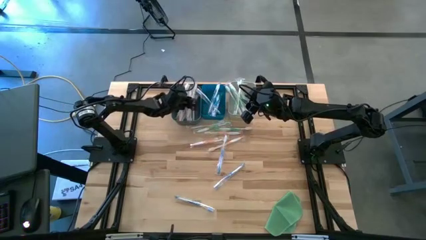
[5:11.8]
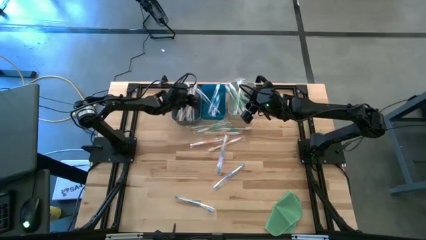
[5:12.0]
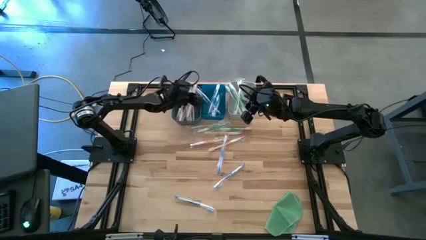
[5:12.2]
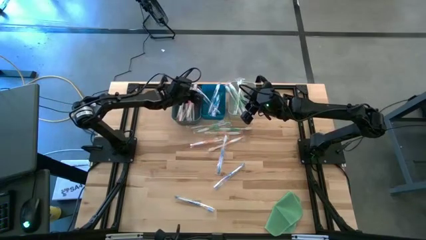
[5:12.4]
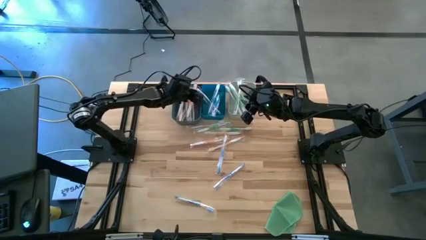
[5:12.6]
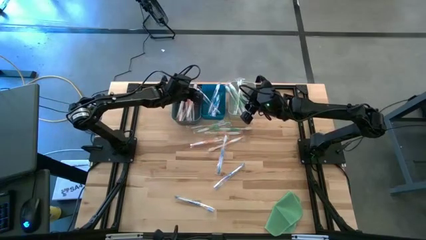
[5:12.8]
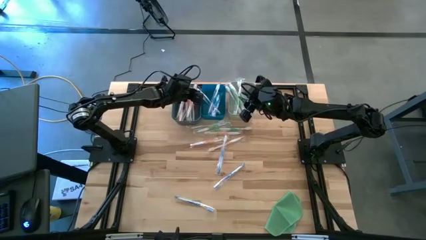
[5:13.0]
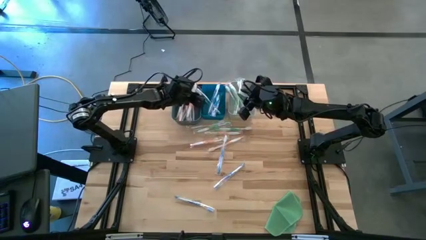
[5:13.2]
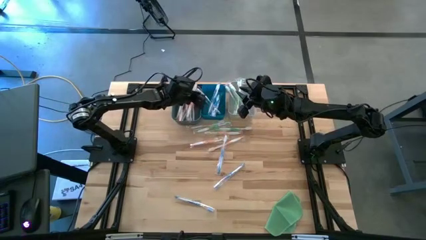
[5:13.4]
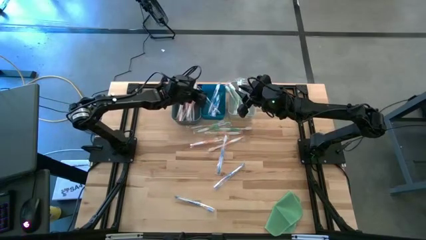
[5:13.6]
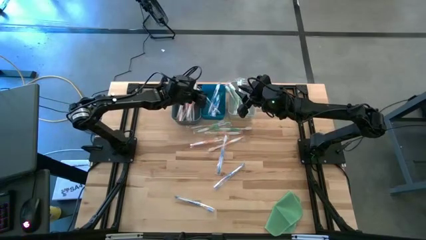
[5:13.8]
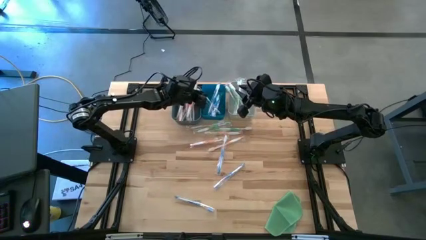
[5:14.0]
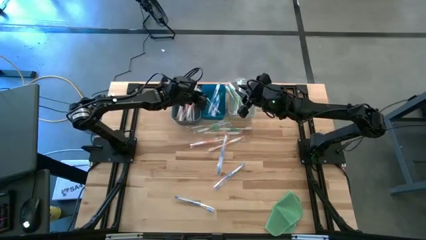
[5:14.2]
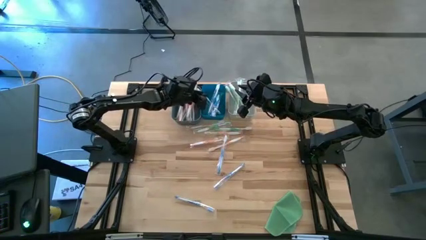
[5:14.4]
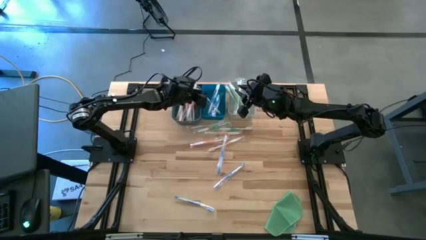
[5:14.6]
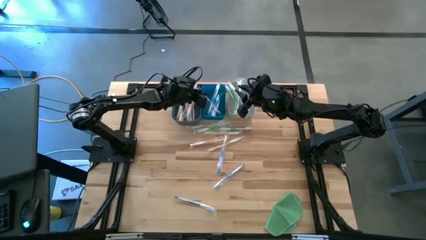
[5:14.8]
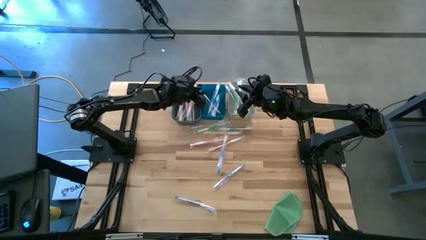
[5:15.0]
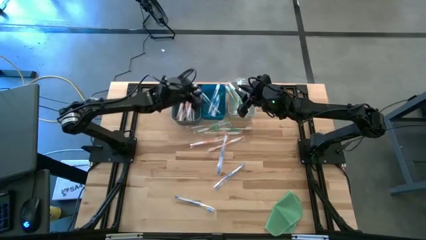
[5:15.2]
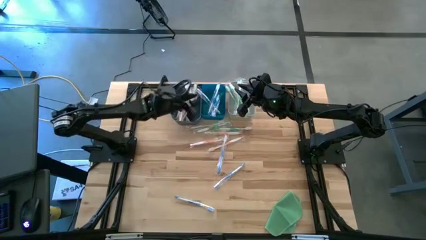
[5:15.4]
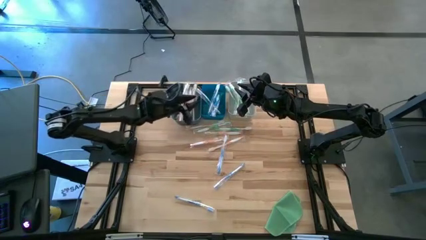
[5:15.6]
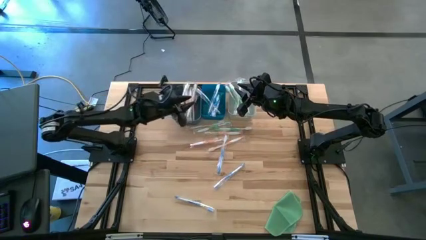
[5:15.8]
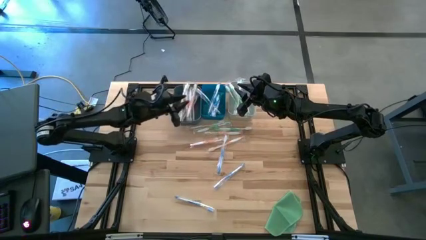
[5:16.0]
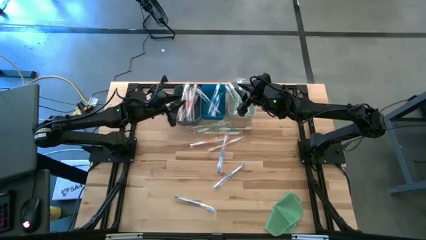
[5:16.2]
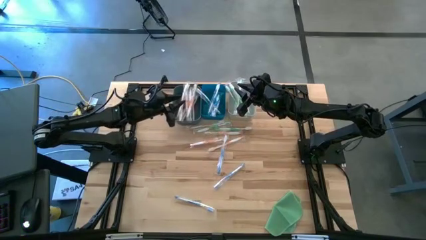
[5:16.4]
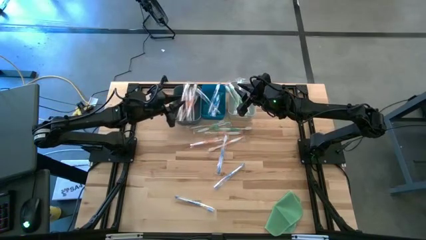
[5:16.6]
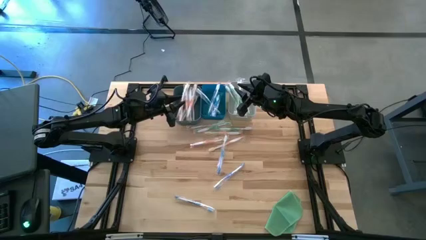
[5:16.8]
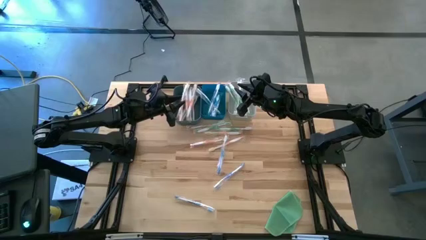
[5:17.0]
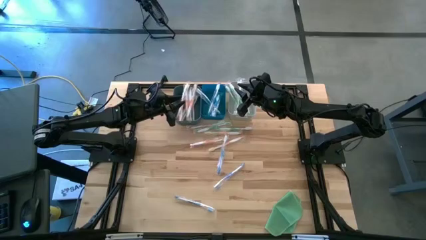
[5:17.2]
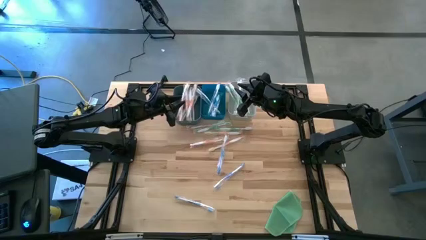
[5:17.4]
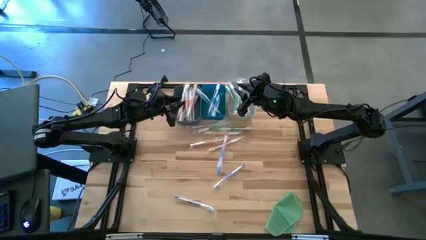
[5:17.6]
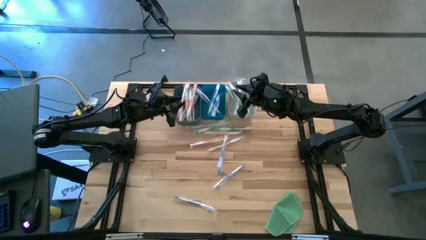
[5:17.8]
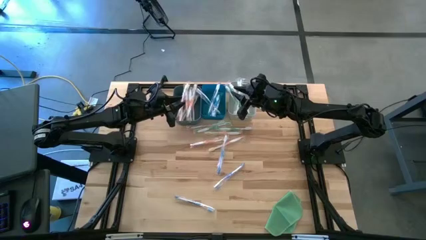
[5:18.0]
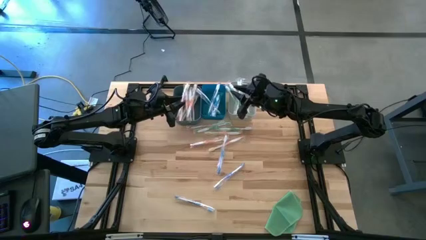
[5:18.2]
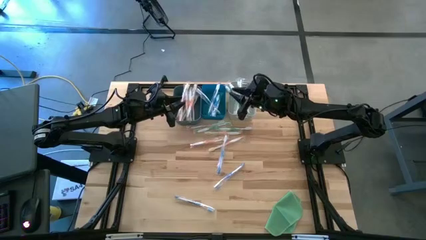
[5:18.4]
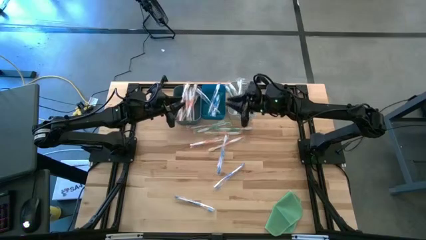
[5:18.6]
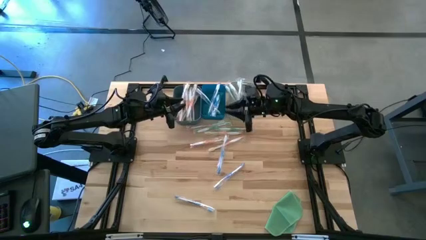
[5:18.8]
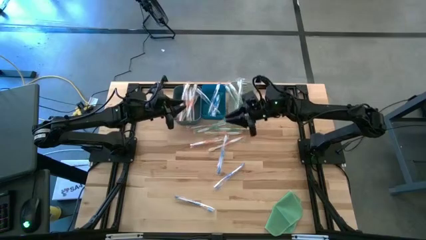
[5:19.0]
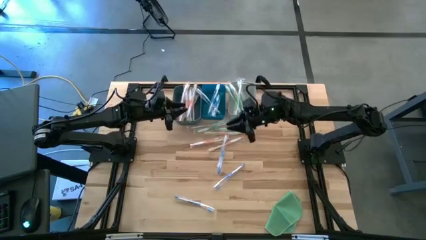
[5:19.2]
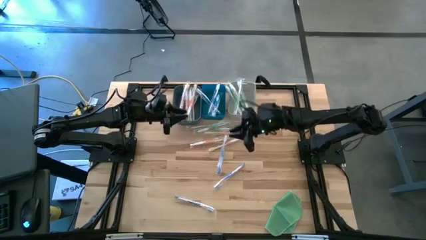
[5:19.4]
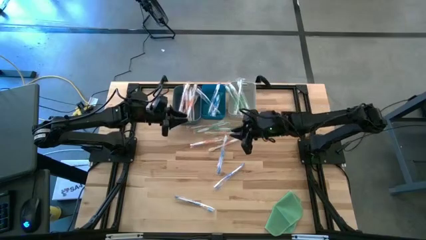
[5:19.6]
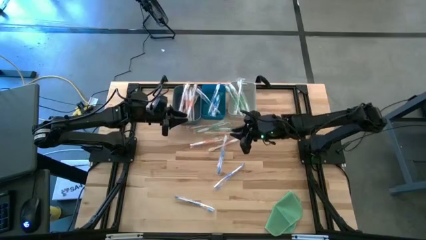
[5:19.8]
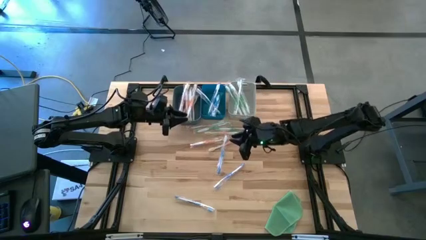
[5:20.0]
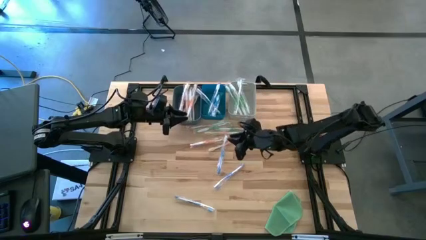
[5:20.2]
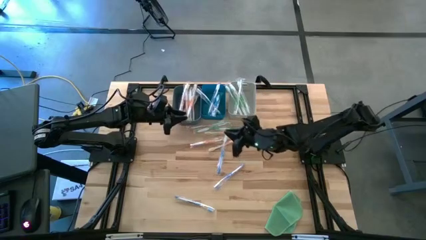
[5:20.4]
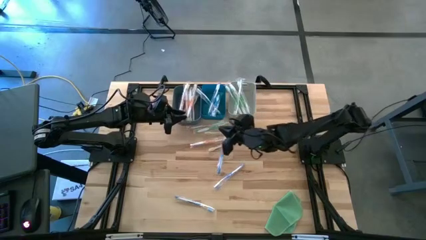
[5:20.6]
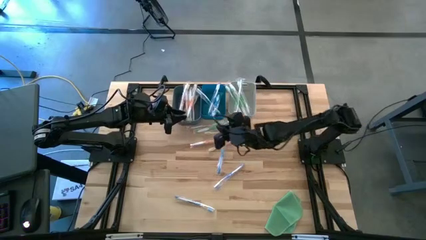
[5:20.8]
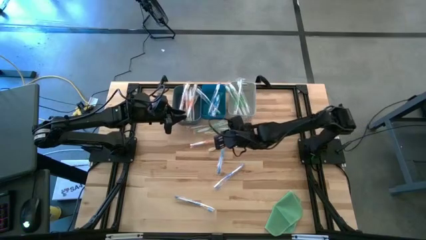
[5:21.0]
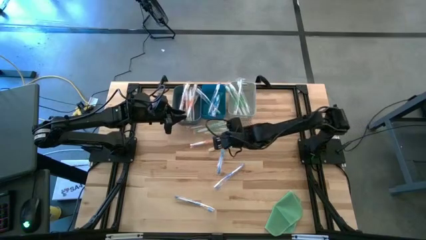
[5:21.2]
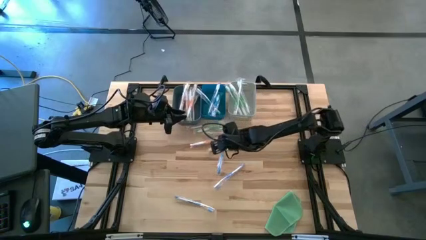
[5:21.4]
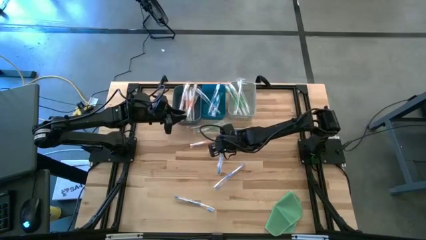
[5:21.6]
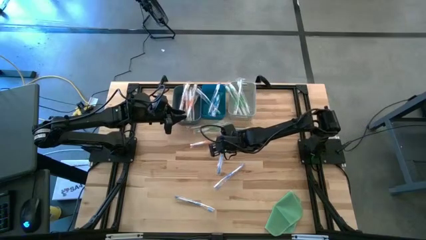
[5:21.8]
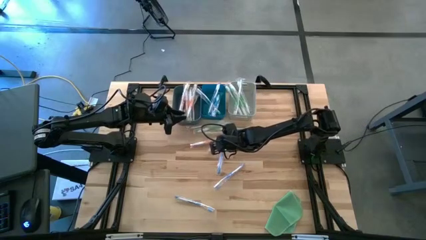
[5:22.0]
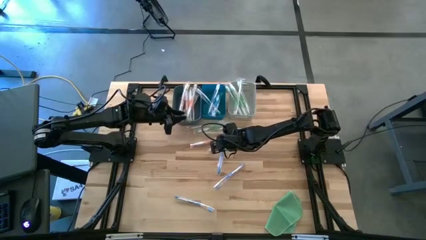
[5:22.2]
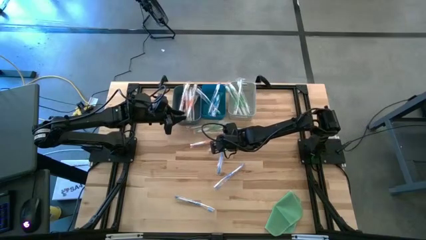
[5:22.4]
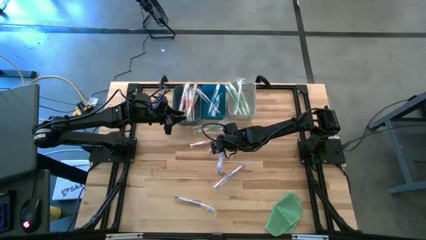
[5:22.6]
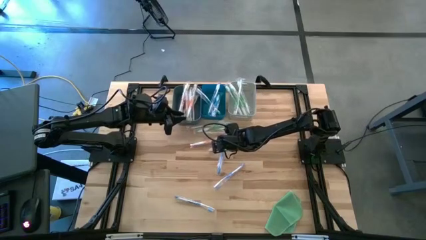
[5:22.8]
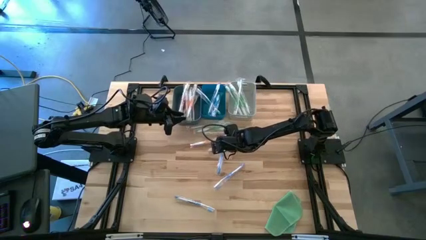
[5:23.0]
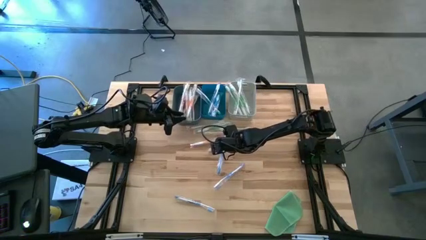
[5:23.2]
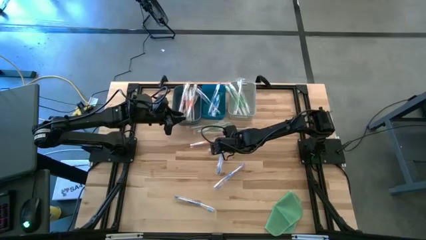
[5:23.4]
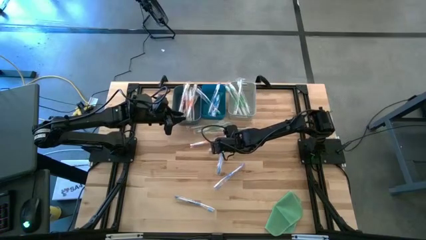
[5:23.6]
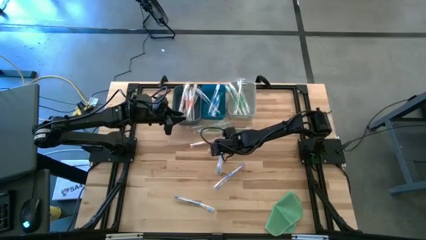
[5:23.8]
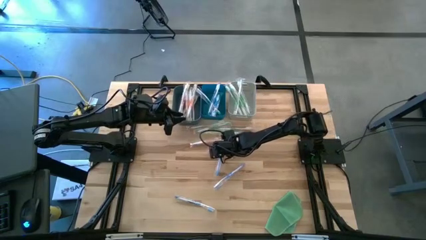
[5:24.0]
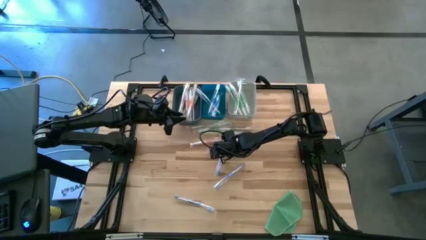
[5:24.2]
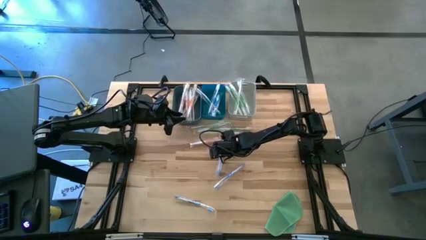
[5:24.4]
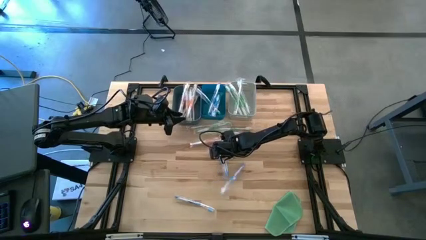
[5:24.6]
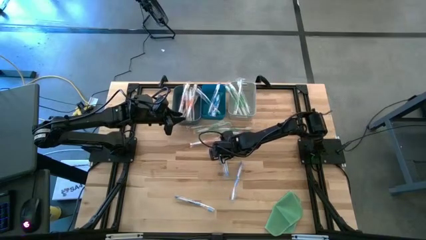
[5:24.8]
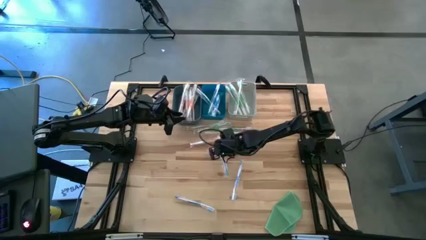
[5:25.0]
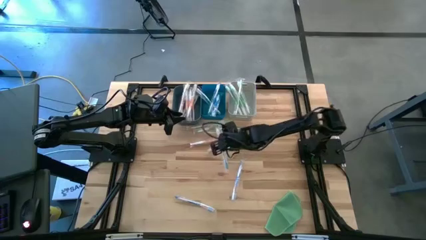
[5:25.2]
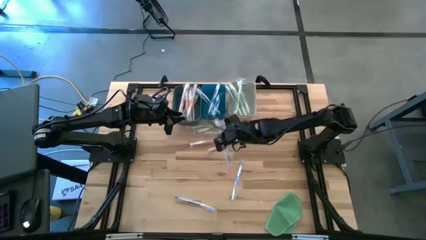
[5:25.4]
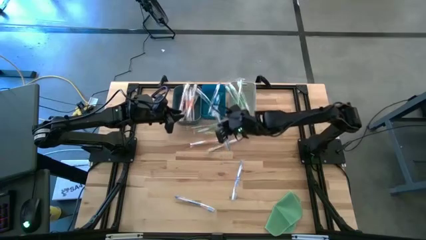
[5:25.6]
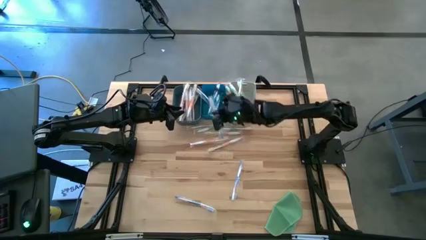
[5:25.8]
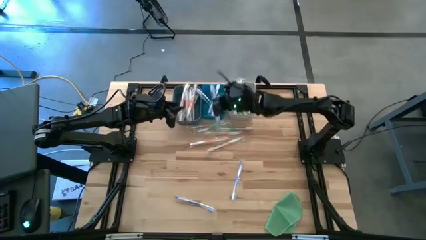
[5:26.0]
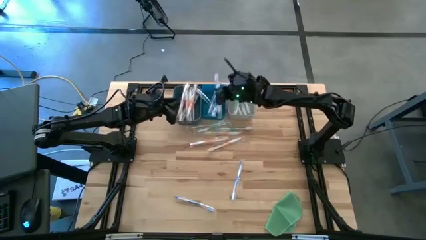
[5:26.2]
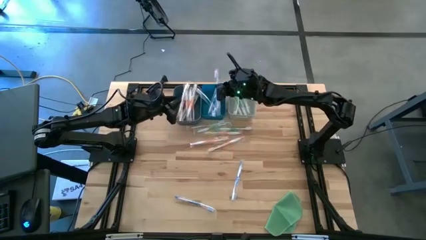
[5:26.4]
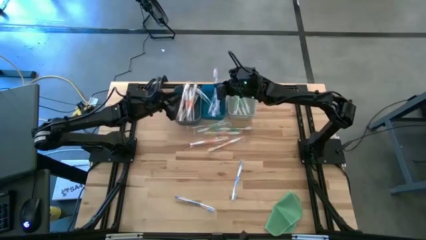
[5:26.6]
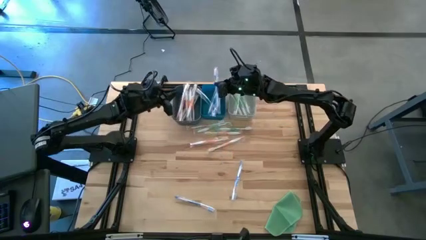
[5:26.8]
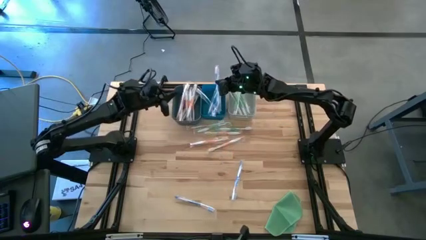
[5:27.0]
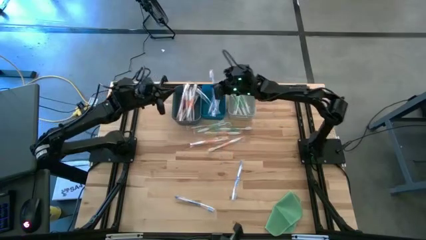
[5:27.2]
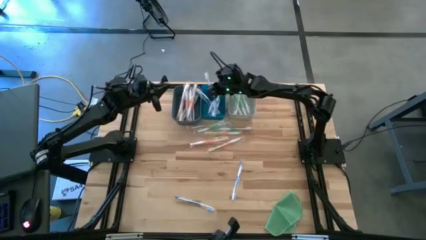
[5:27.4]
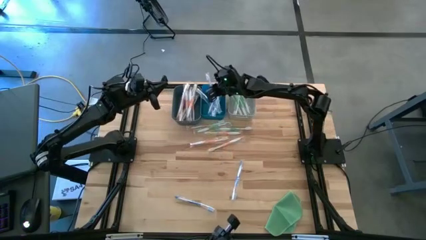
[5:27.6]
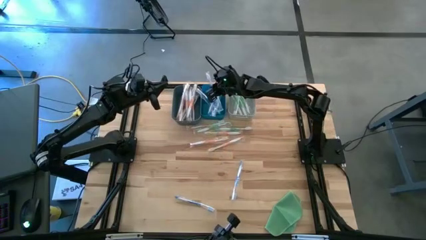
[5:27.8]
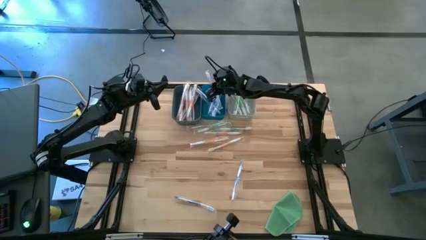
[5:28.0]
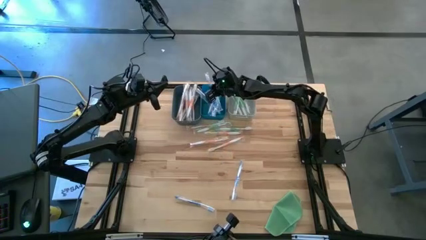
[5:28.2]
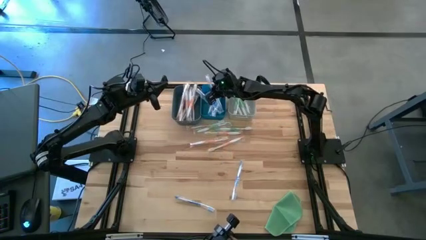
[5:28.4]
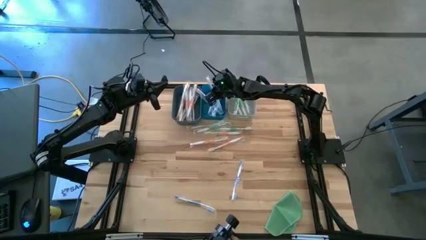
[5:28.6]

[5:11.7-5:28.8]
Task: Pick & Place Toothbrushes
Put the blue toothbrush into the blue bin
